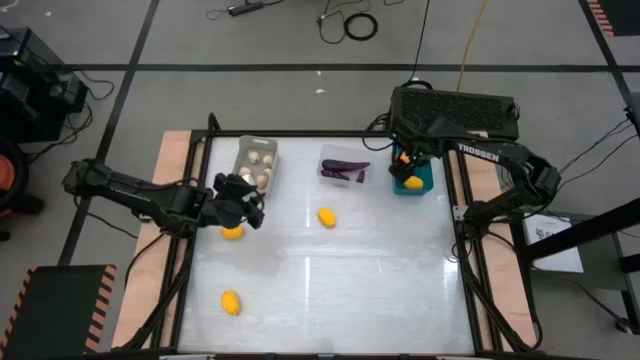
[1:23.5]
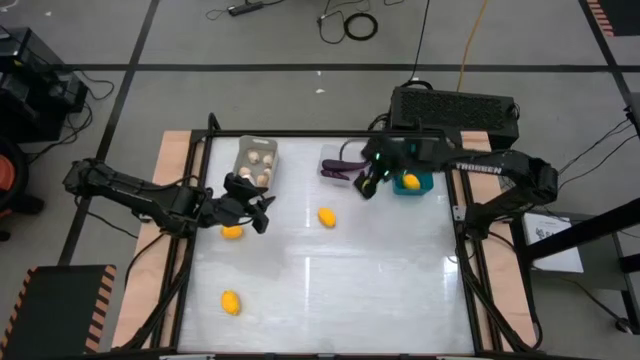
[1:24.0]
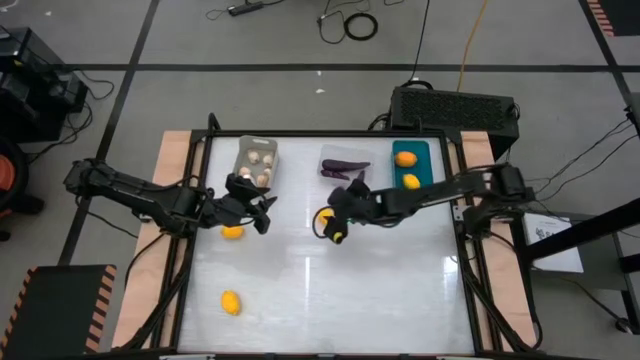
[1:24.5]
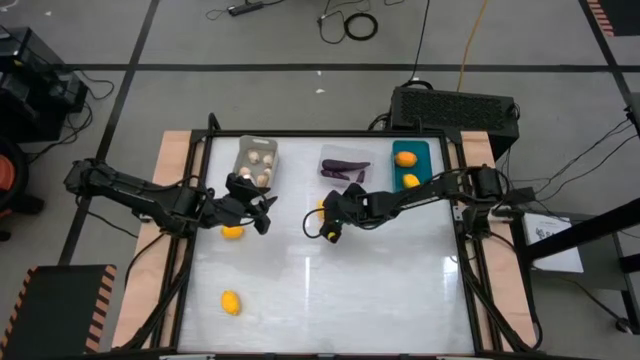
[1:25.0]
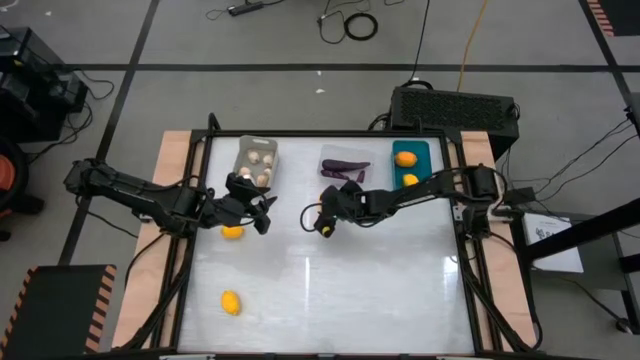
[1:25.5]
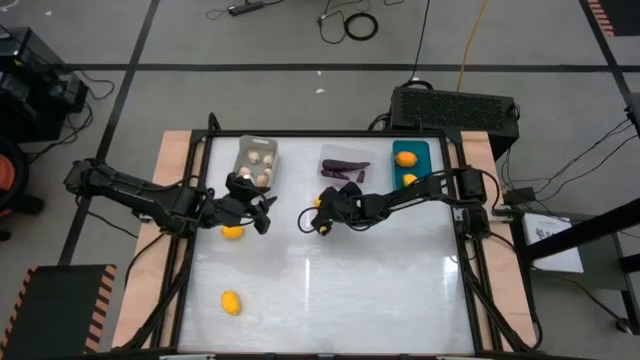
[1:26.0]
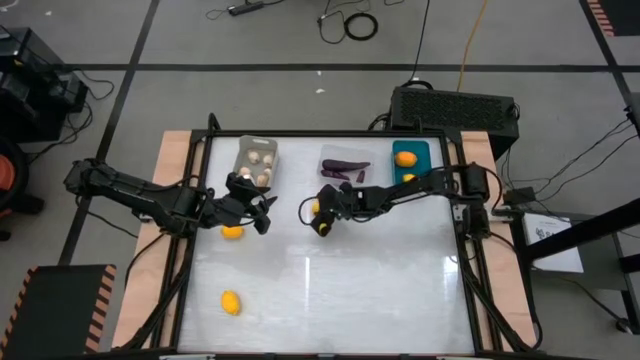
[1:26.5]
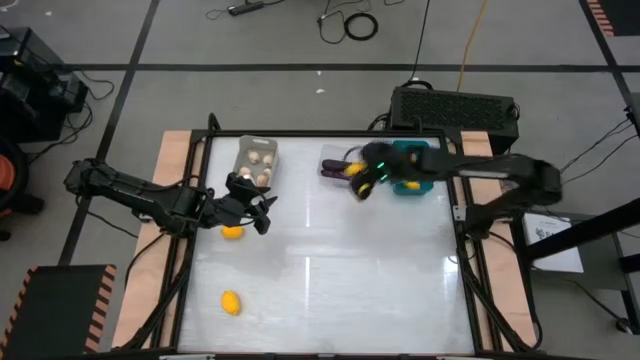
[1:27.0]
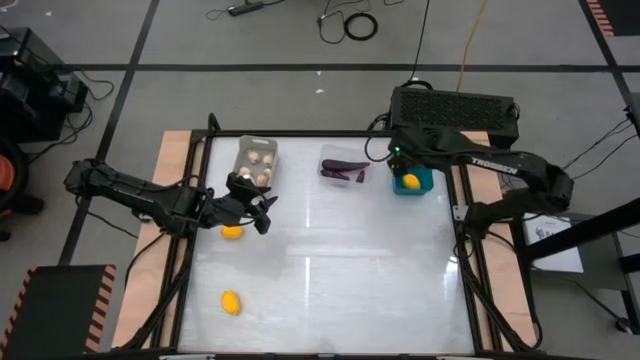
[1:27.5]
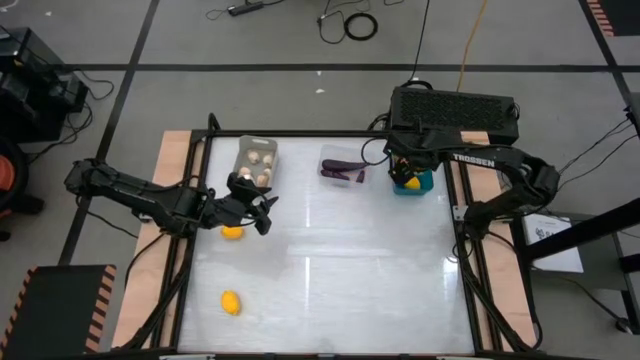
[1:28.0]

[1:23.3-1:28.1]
Task: Sort produce into baskets
Put the lemon into the blue bin

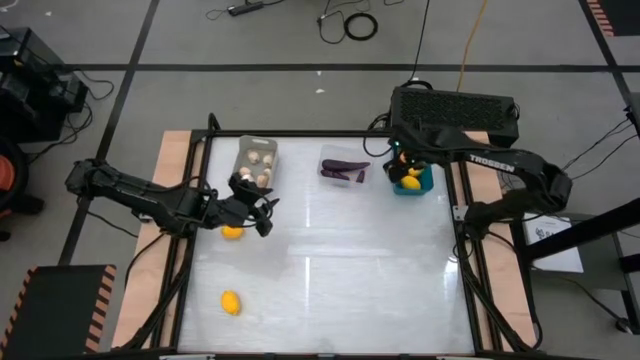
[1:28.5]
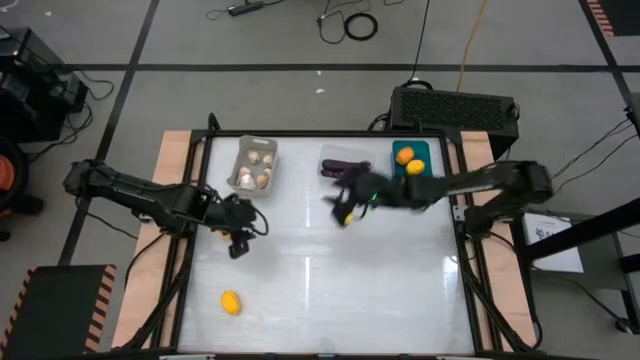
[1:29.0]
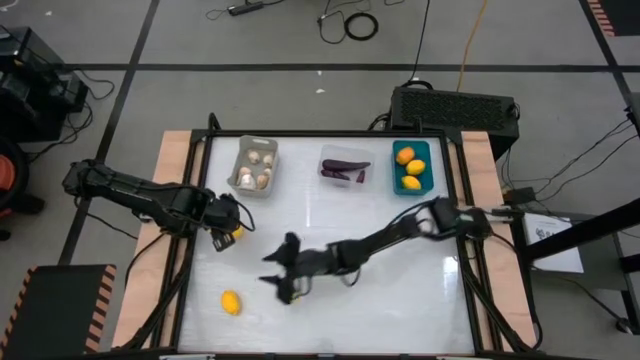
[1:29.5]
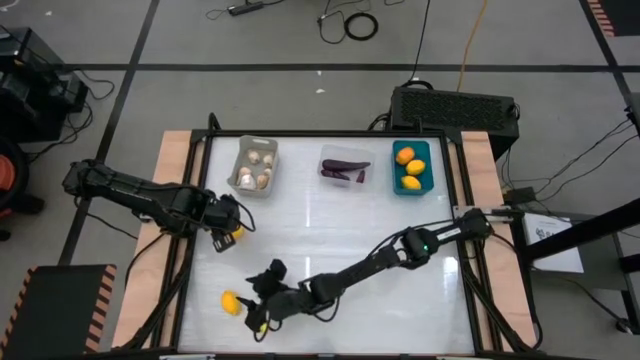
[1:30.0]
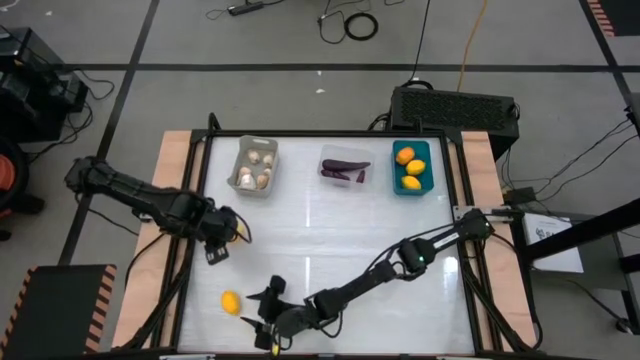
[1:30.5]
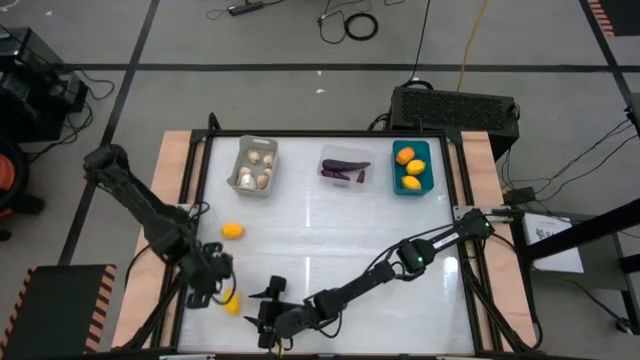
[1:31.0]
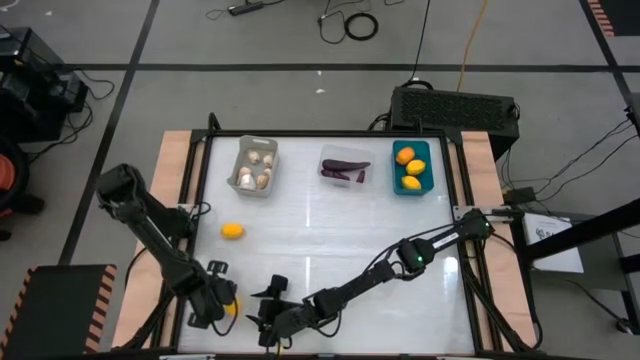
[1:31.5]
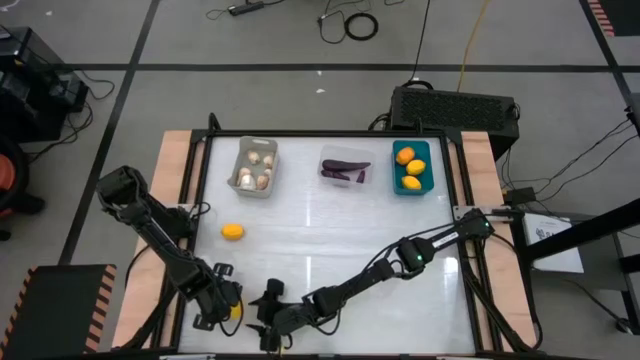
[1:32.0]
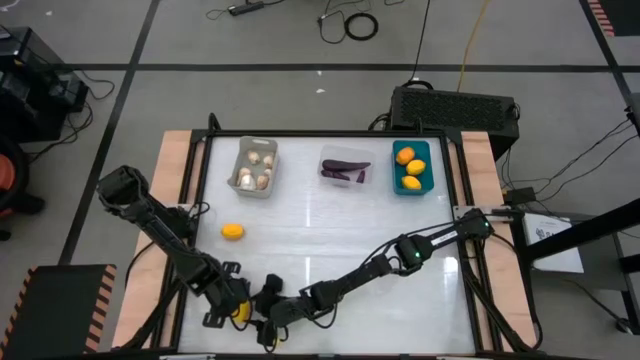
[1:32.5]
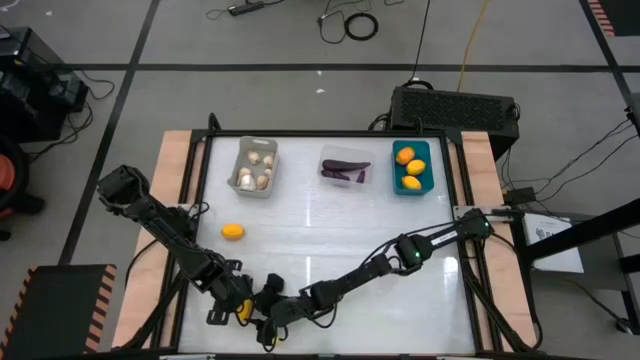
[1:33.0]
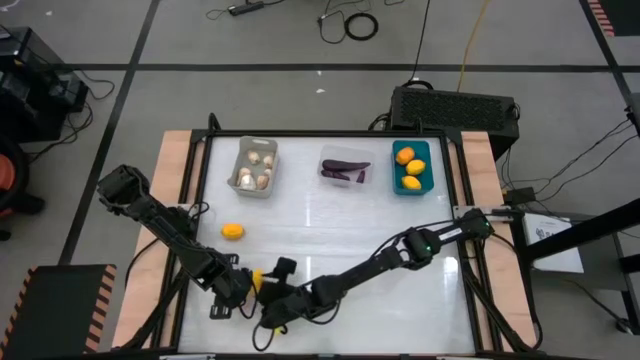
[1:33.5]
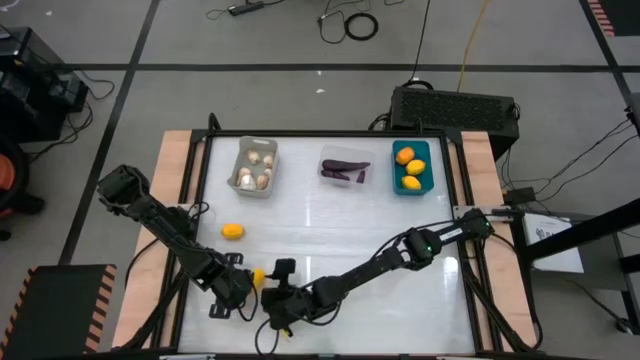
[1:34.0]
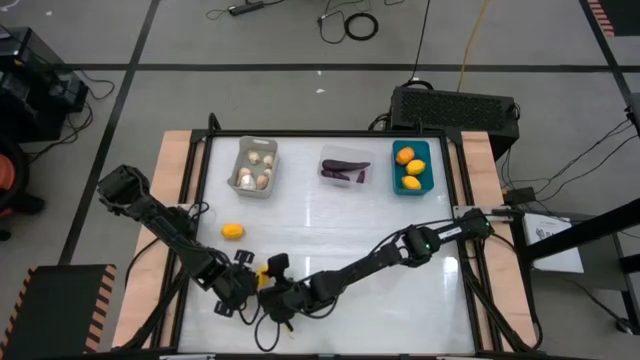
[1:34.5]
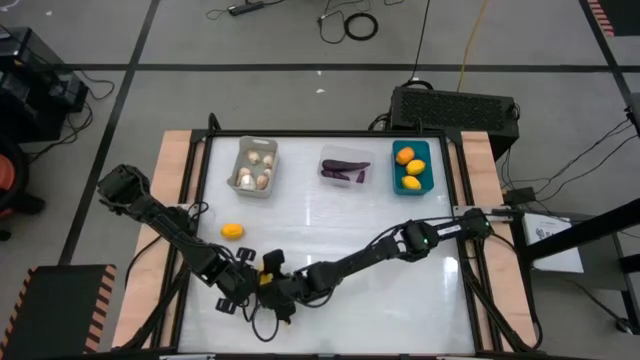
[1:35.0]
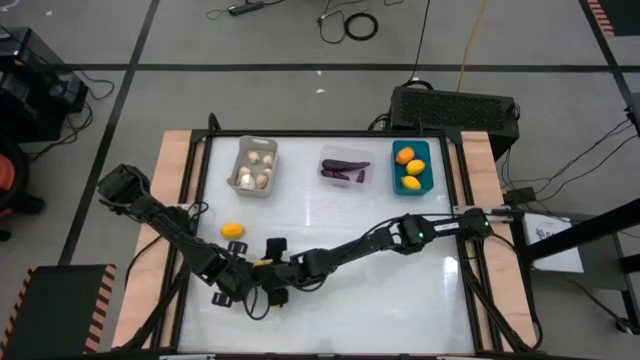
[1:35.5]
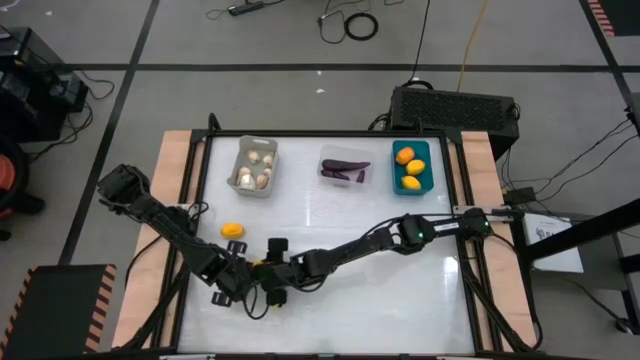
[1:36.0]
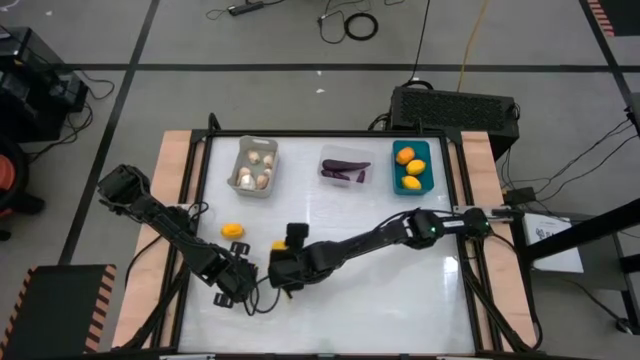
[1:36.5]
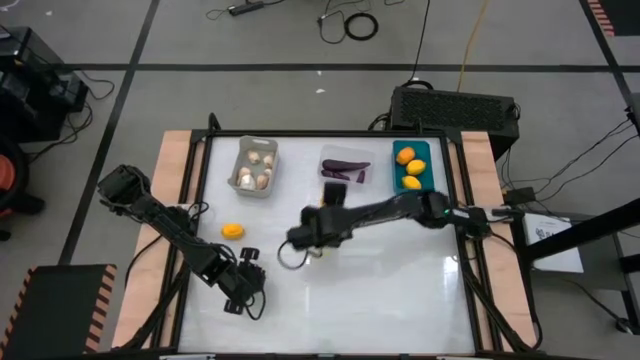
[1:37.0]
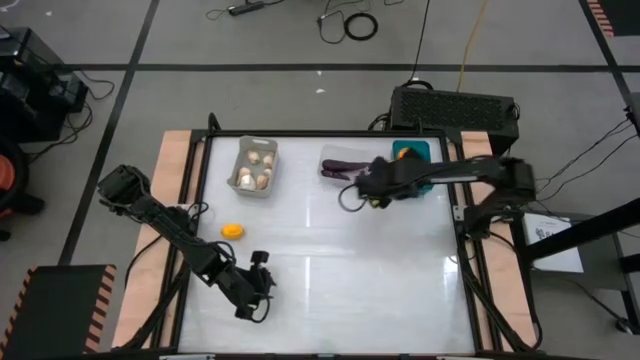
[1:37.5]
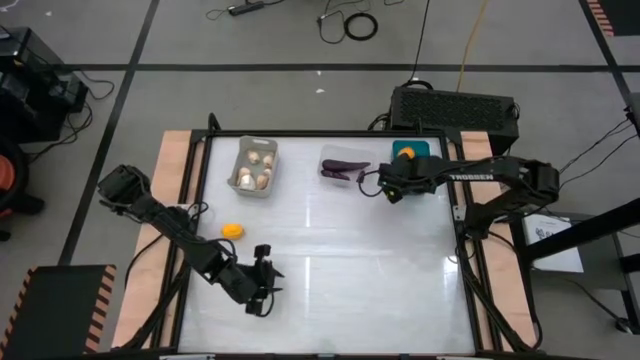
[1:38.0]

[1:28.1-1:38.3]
Put the lemon into the blue bin

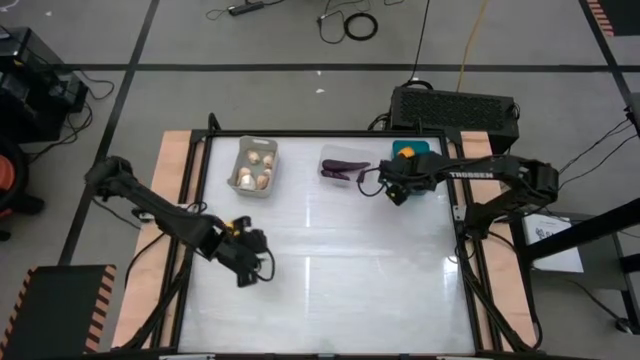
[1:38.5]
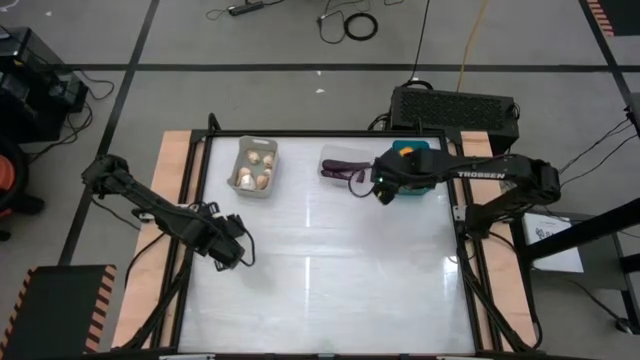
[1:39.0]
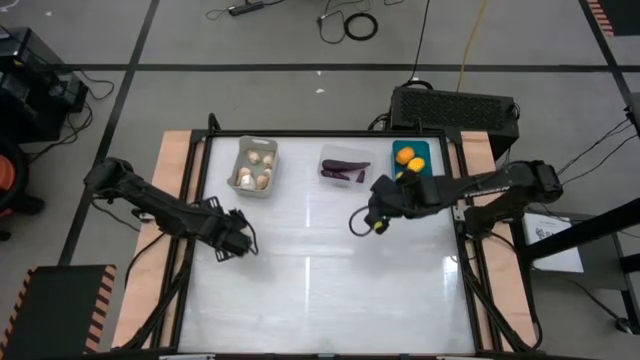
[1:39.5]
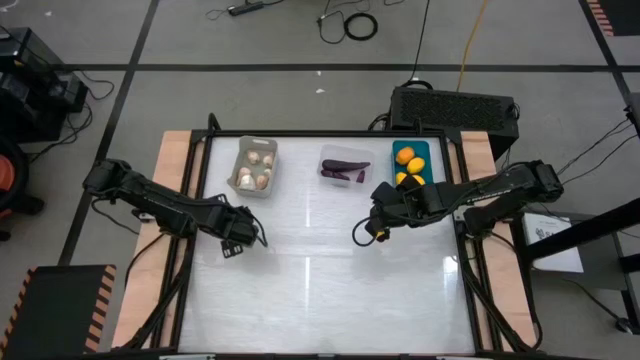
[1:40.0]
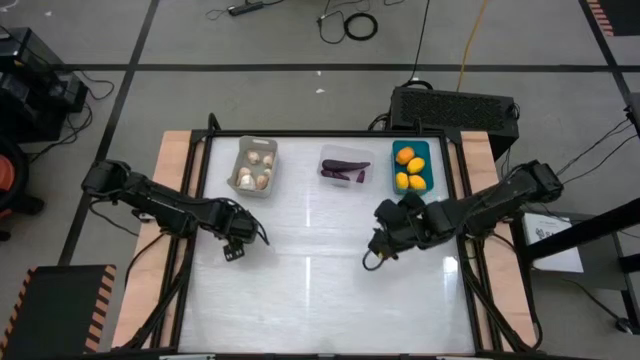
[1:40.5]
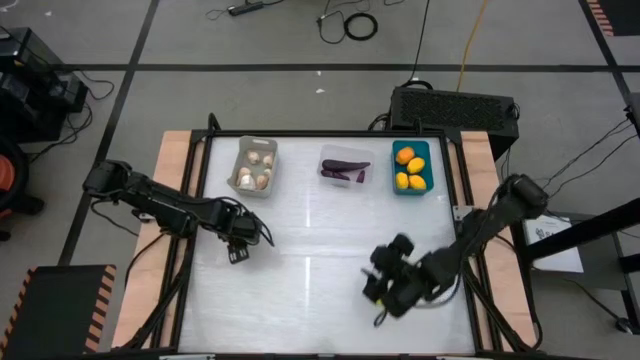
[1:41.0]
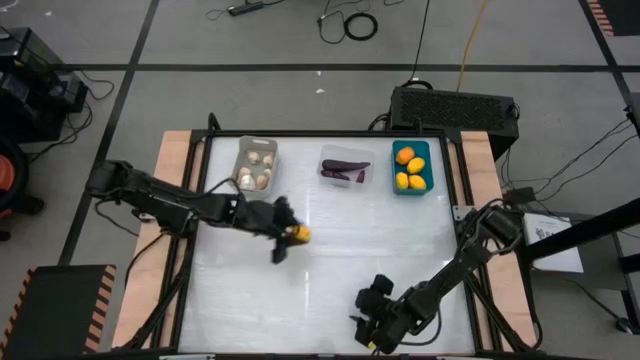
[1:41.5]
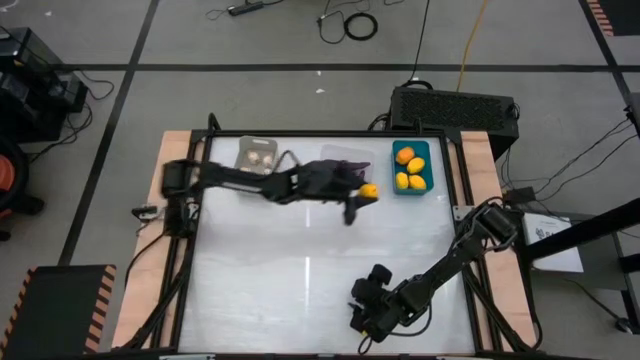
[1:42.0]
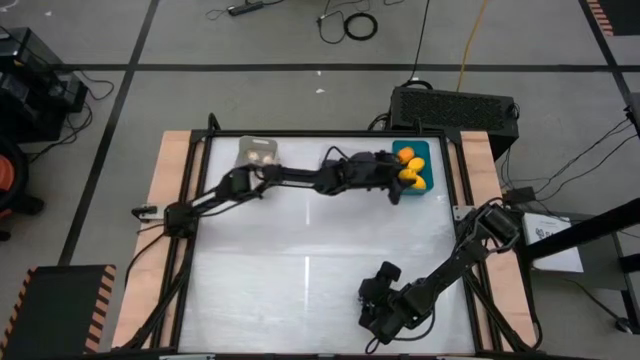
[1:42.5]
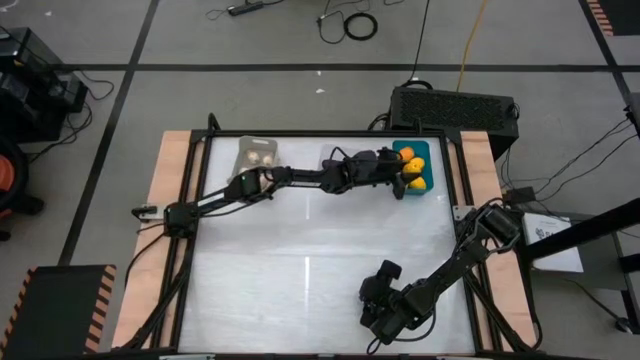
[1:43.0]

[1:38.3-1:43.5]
Put the lemon into the blue bin

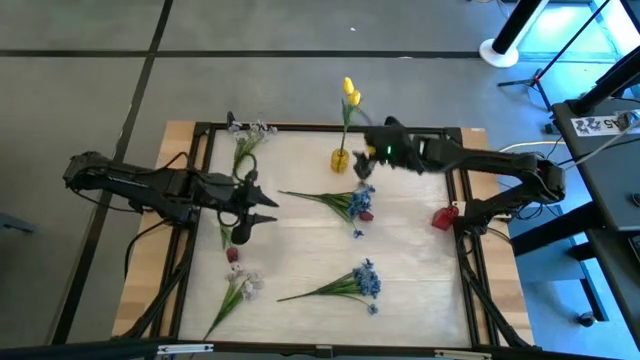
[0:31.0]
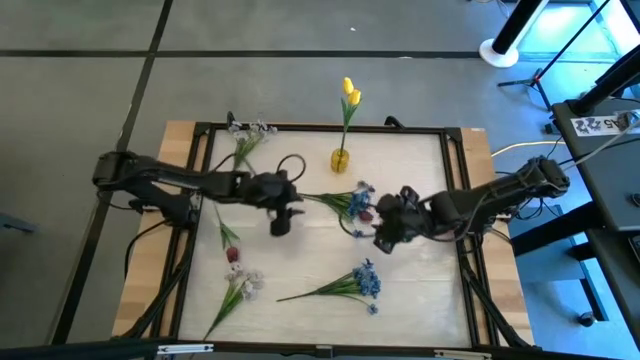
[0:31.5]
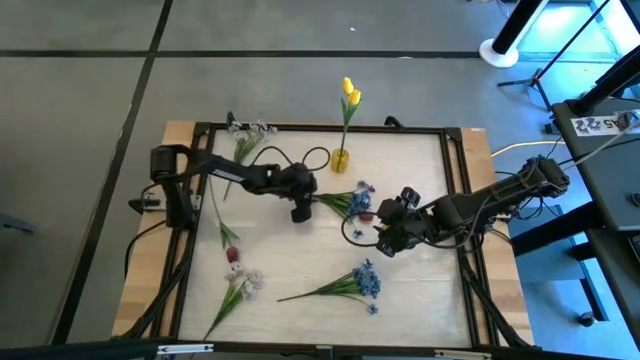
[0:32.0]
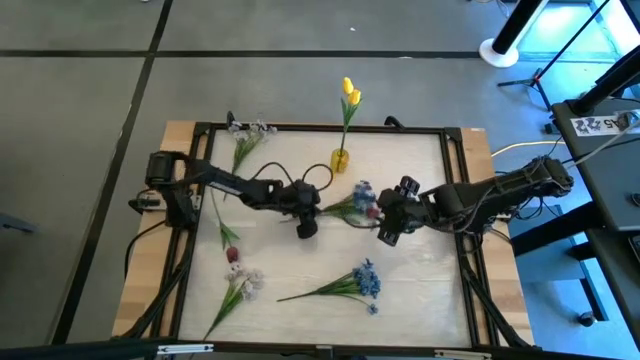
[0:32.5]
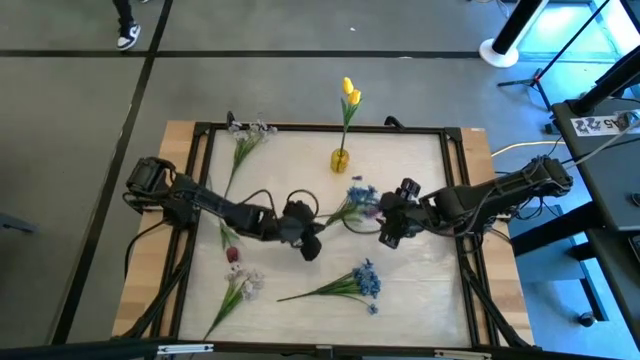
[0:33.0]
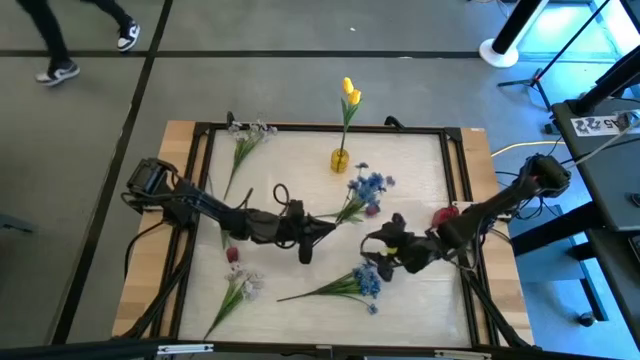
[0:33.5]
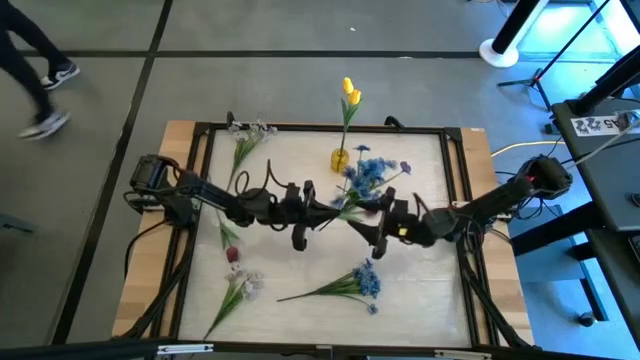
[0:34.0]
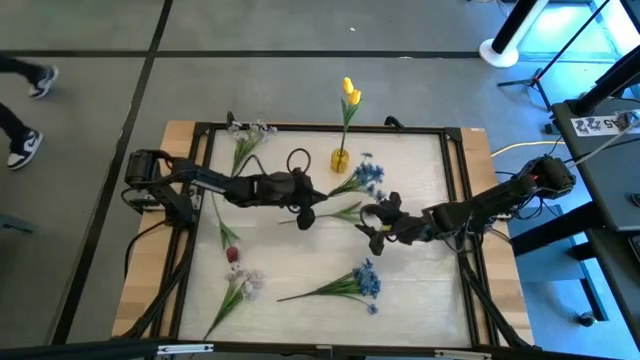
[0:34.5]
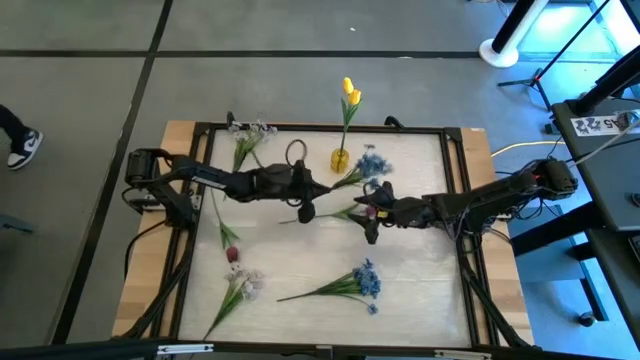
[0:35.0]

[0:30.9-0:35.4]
Task: Sort flowers into vase by color
Adjust the top blue flowers
